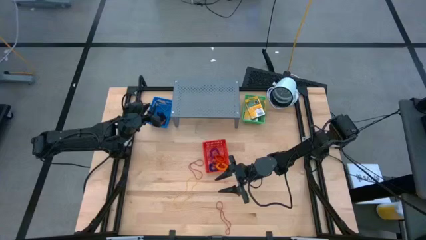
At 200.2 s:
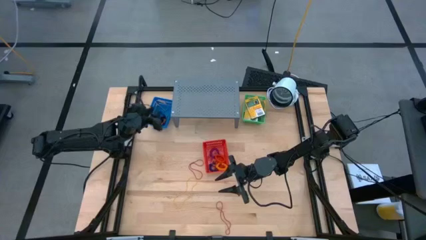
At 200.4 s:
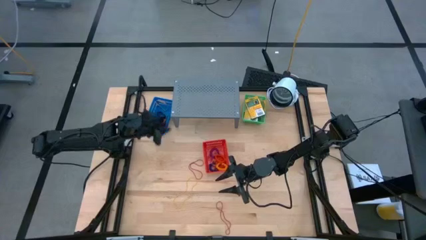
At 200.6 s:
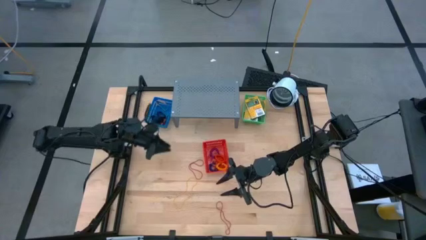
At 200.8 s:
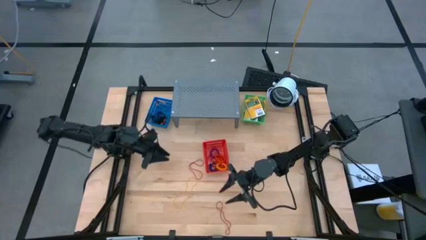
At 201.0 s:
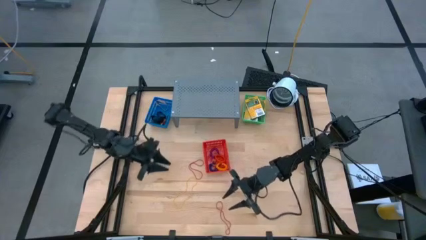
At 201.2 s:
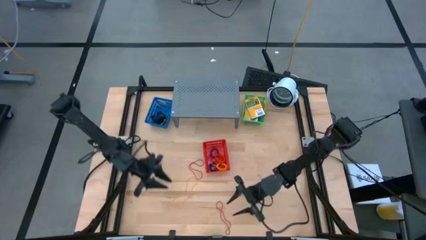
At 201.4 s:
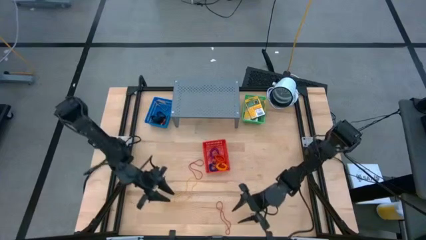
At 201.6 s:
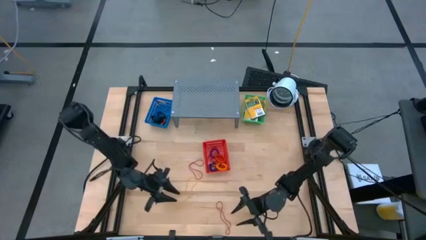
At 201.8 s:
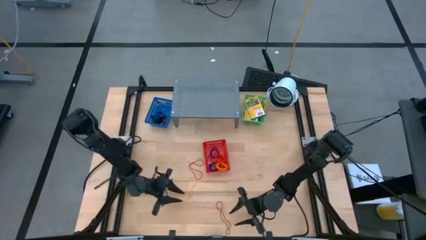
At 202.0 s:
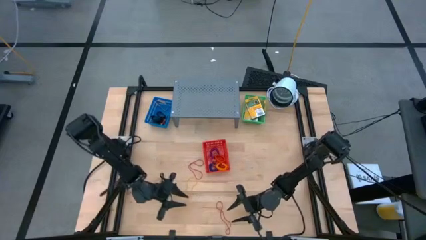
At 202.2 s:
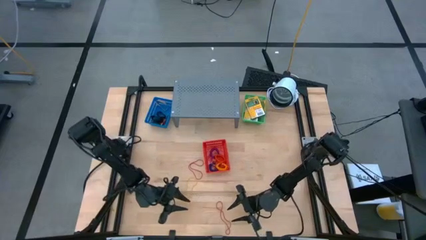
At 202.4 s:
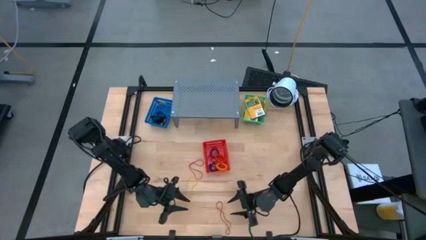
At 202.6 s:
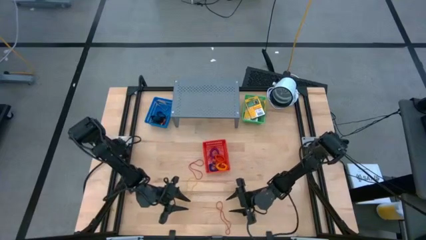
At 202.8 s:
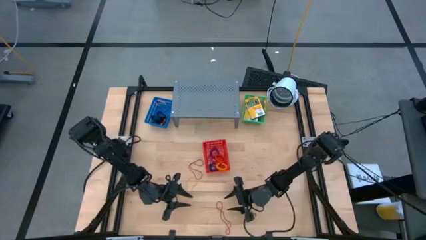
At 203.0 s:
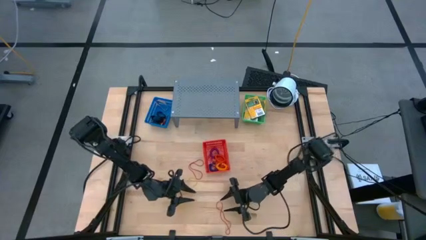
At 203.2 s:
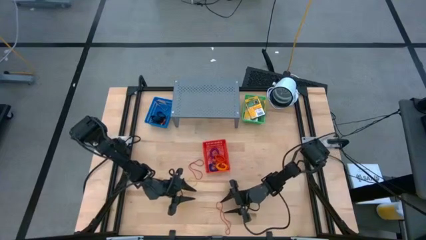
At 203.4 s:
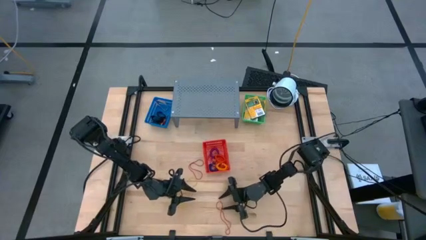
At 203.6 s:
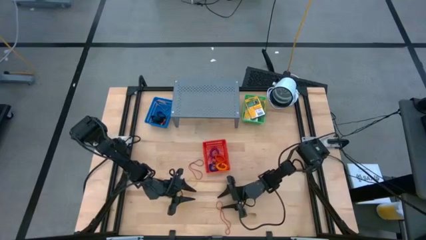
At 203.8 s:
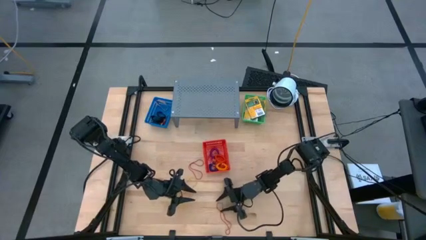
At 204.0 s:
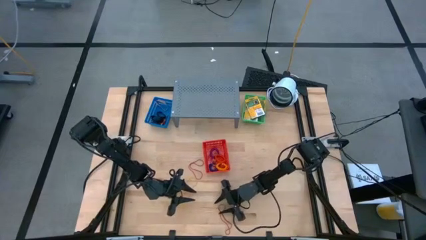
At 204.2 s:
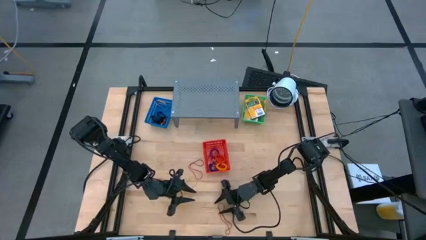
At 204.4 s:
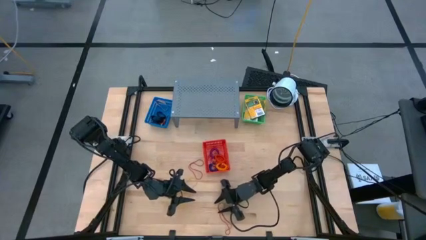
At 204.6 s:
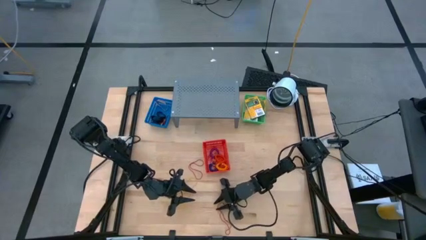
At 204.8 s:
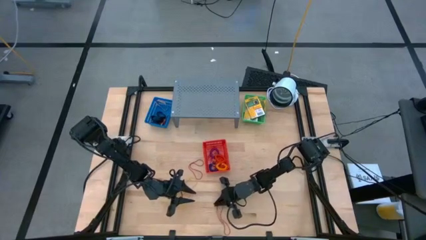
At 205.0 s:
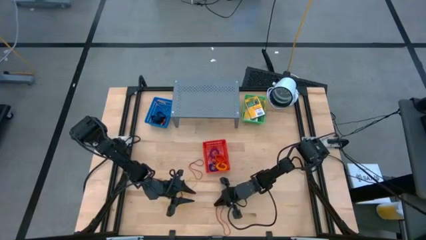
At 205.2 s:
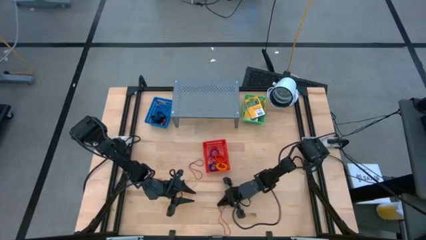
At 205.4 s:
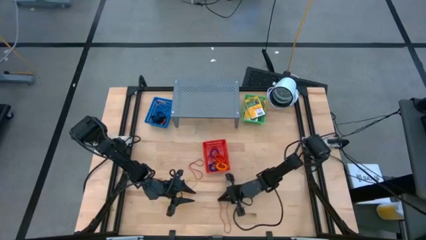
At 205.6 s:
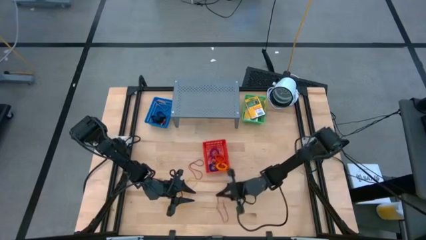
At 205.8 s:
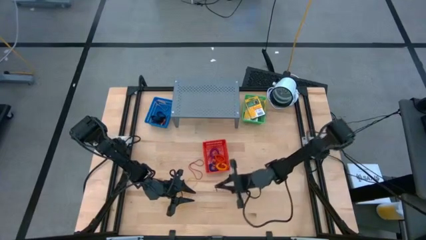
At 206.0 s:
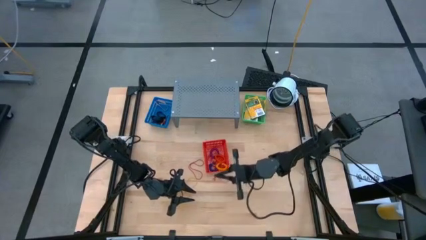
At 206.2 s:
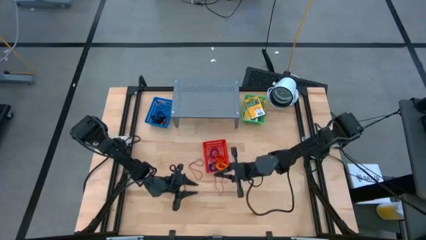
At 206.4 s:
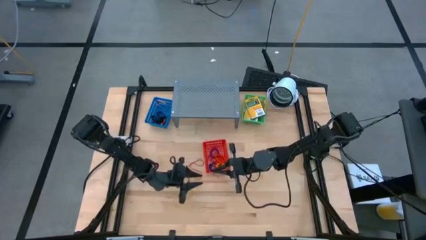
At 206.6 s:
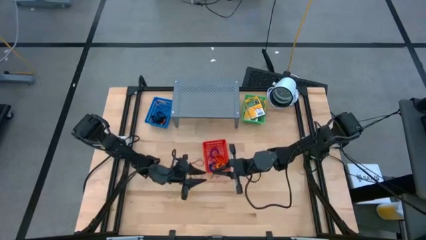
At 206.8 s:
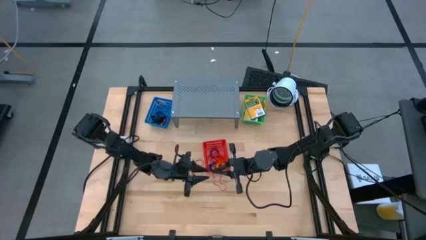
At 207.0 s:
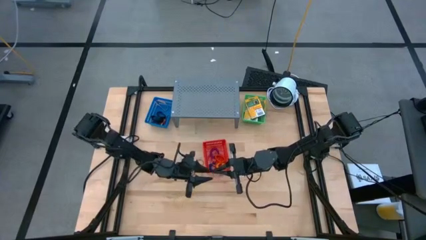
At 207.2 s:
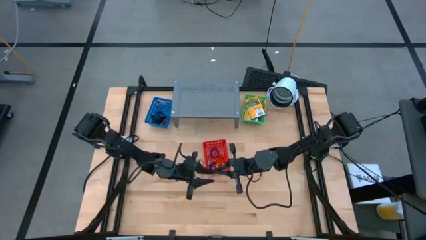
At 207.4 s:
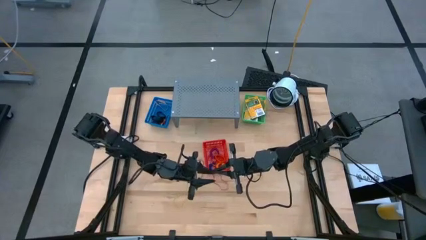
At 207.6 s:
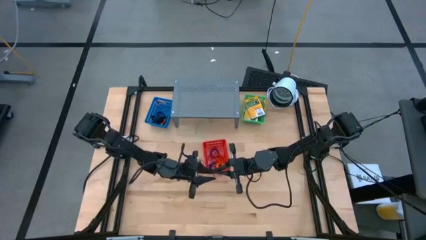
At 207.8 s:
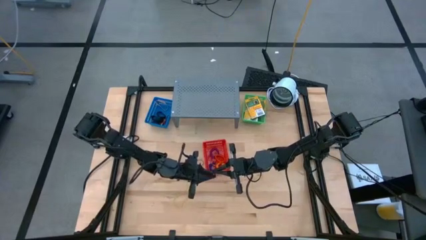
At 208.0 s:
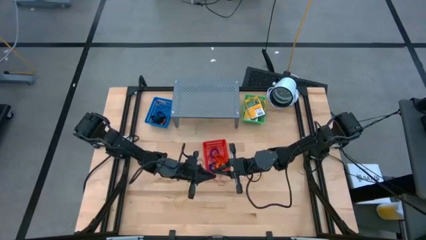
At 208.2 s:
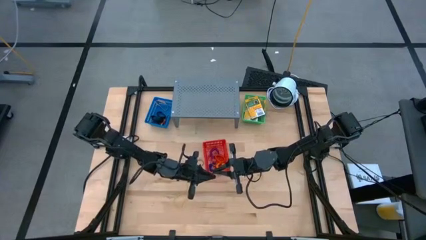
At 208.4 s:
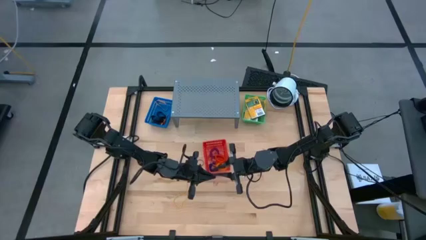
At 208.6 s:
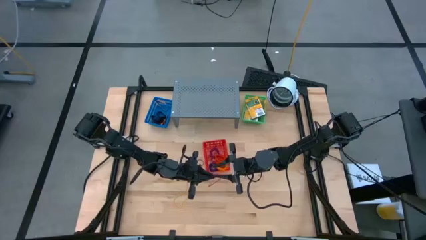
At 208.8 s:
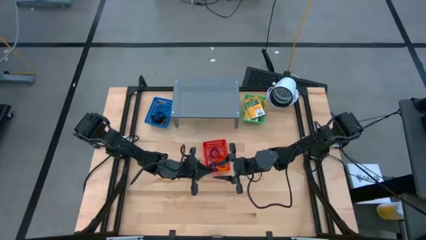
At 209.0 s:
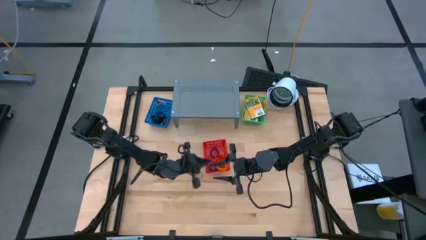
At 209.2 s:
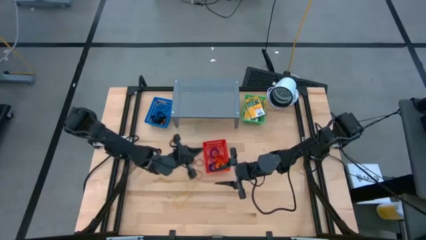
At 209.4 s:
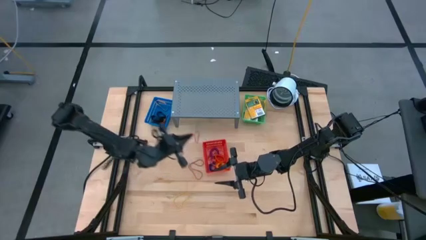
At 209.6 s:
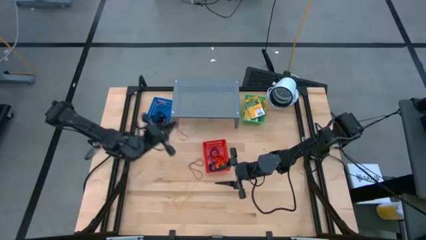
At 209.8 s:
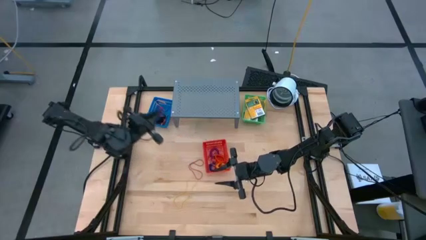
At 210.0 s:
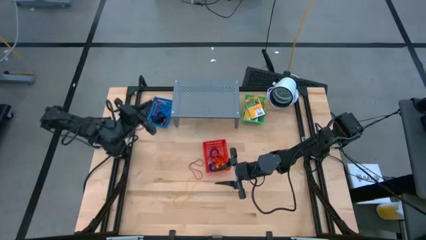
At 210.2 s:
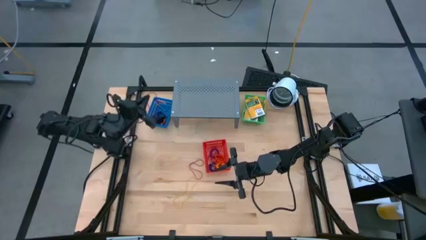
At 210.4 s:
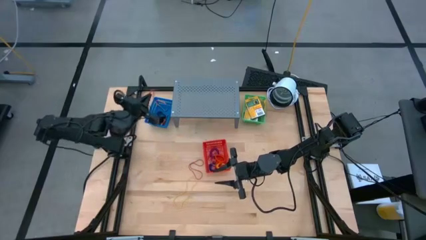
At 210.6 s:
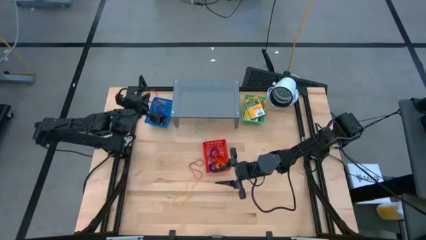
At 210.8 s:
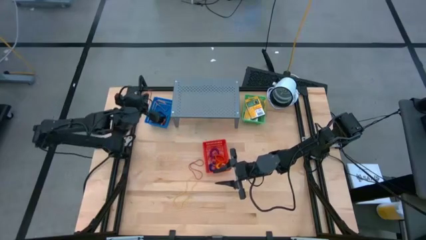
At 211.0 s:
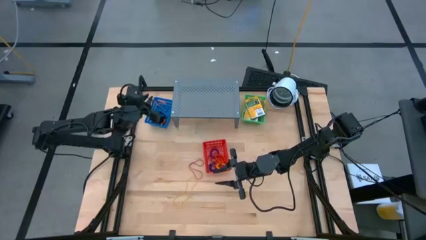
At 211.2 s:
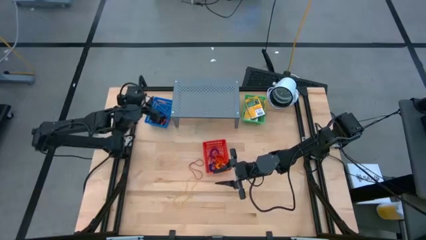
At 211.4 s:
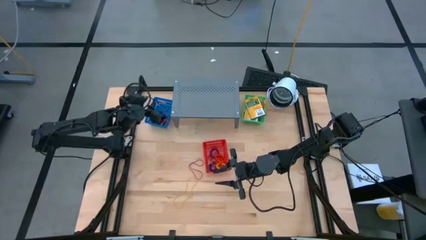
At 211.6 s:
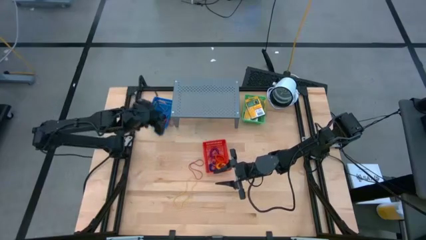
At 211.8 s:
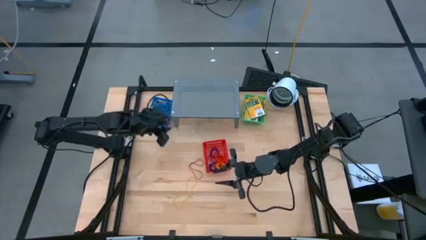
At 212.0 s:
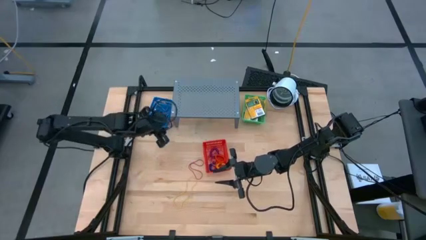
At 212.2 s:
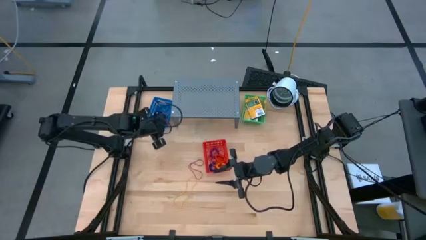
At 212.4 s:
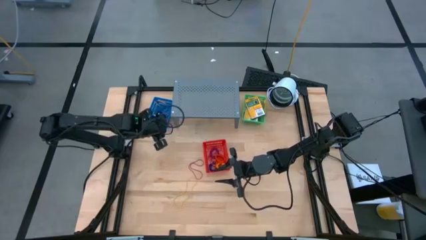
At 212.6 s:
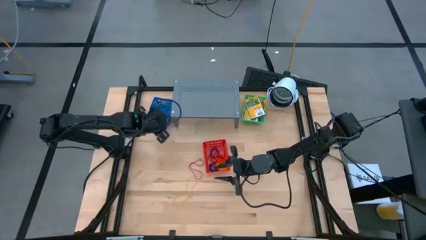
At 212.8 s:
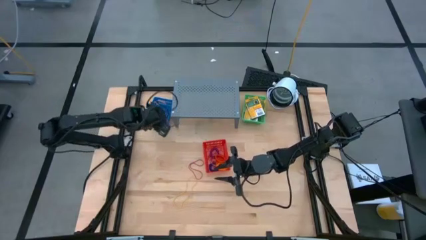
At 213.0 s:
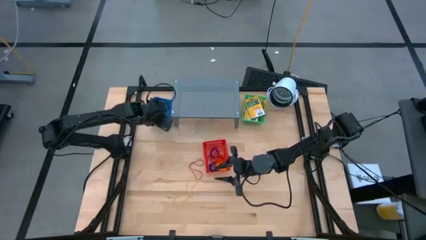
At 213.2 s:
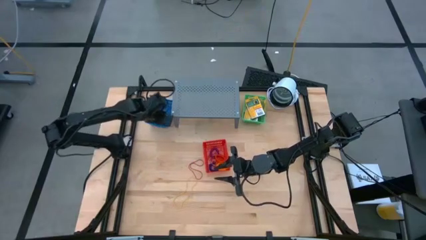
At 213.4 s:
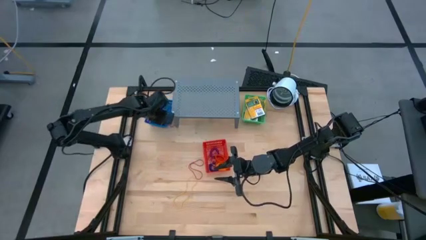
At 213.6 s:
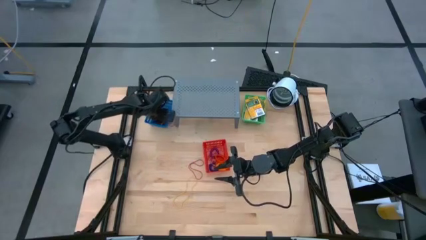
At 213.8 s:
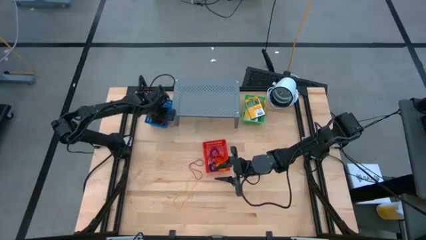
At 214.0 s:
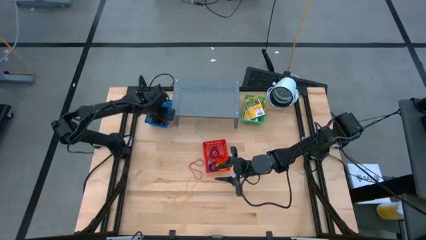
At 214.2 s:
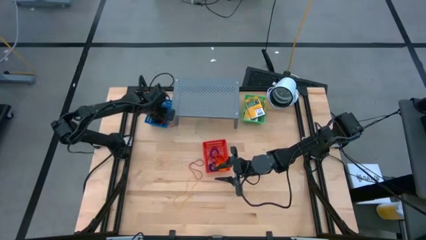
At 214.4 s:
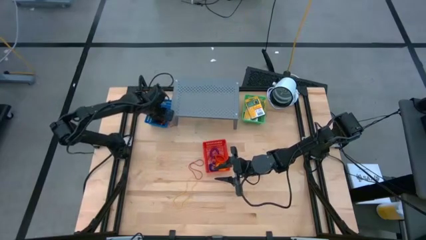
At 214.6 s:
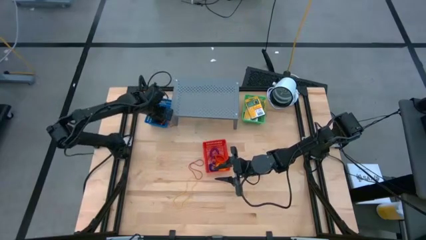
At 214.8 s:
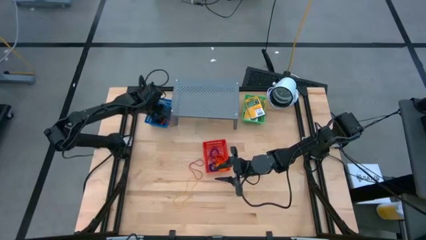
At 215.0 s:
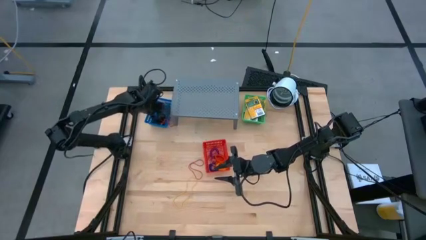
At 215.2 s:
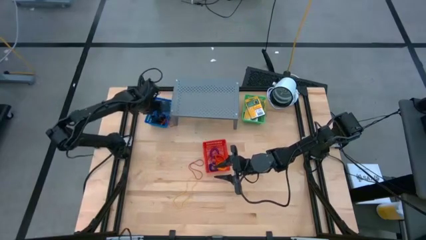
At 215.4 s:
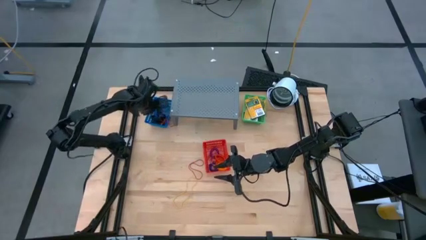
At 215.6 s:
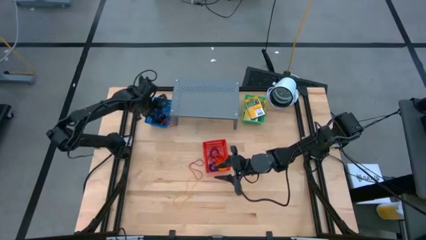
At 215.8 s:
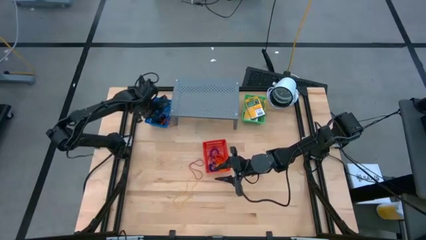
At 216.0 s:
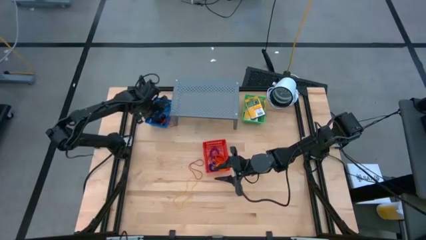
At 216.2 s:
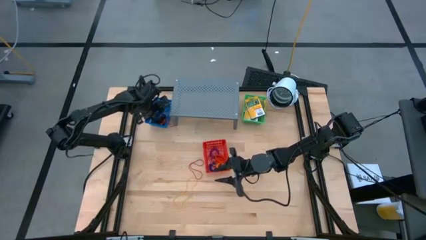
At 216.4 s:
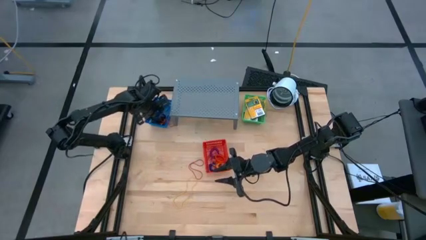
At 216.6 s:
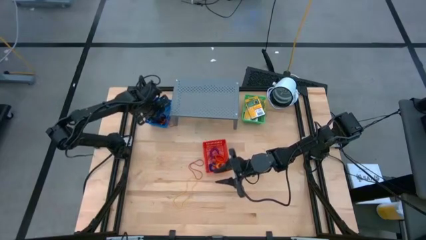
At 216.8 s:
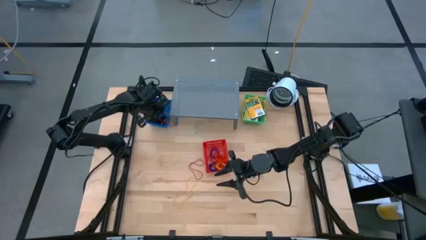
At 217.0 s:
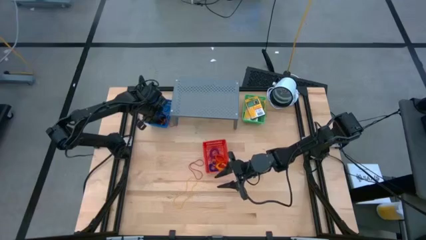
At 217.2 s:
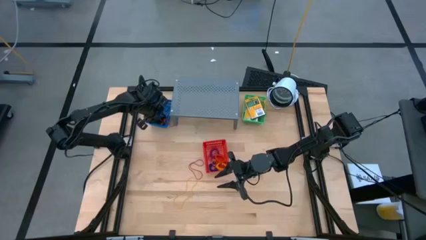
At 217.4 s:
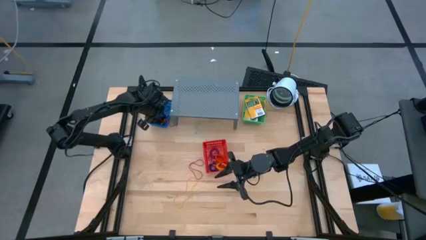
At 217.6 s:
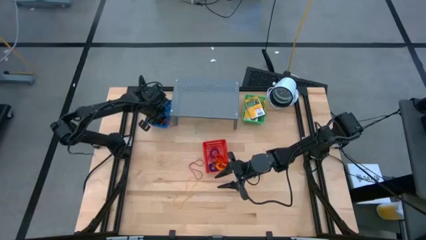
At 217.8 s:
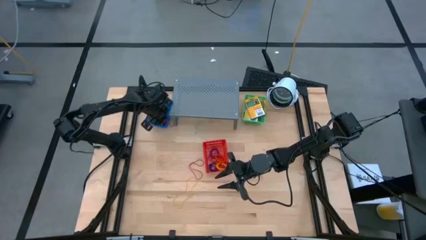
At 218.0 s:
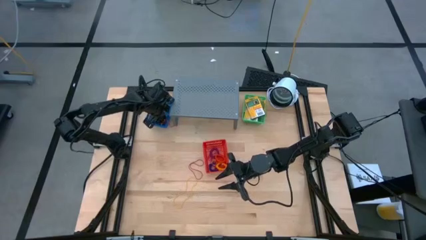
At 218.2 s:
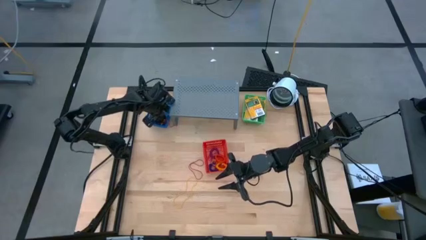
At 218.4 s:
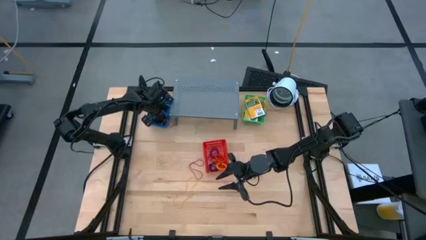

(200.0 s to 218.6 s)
Task: Pick & Place Office Desk Supplies
Put the bottom red rubber band into the blue basket
